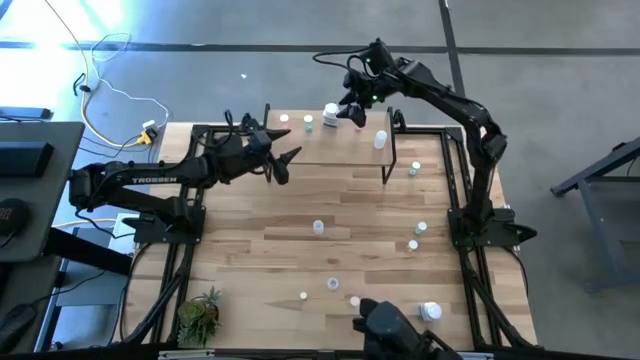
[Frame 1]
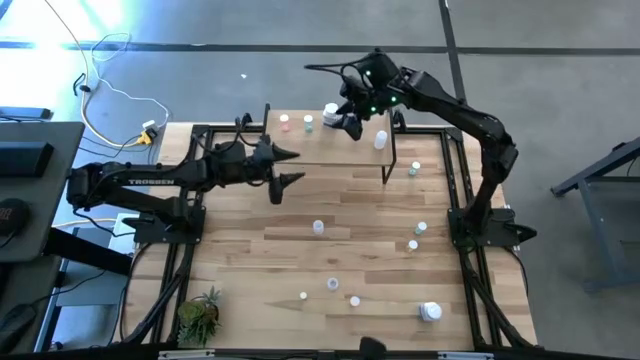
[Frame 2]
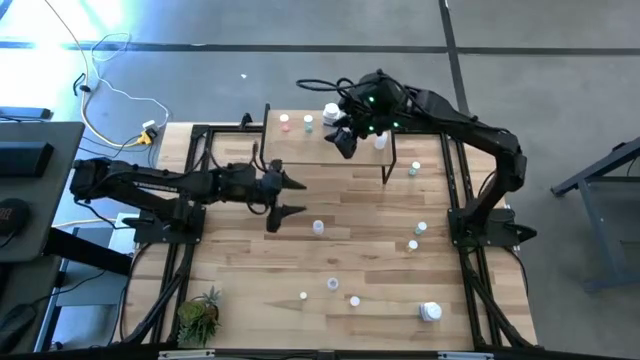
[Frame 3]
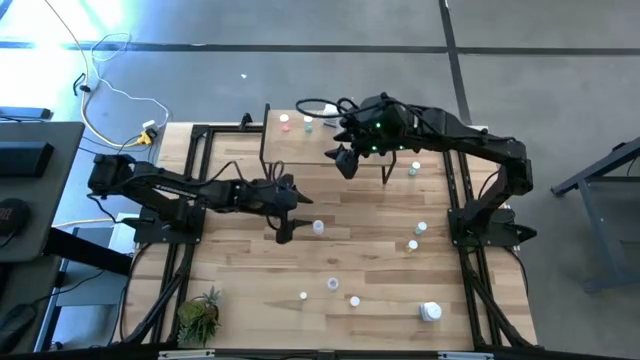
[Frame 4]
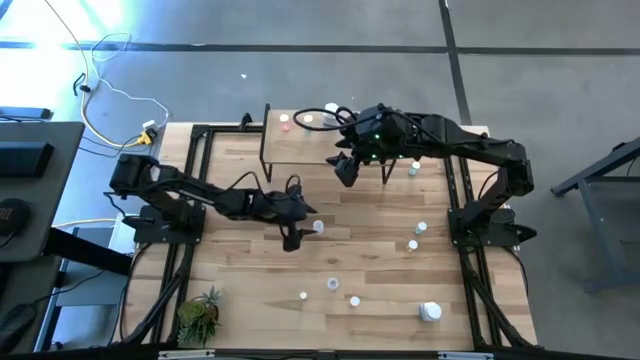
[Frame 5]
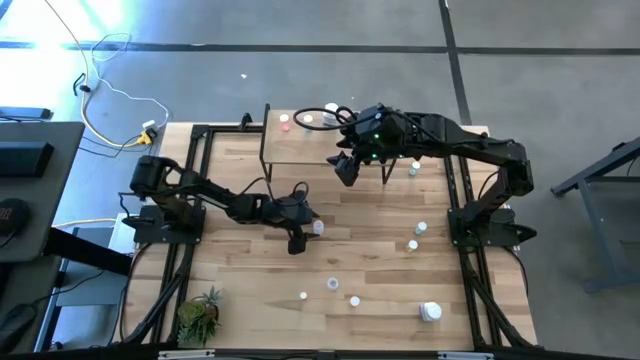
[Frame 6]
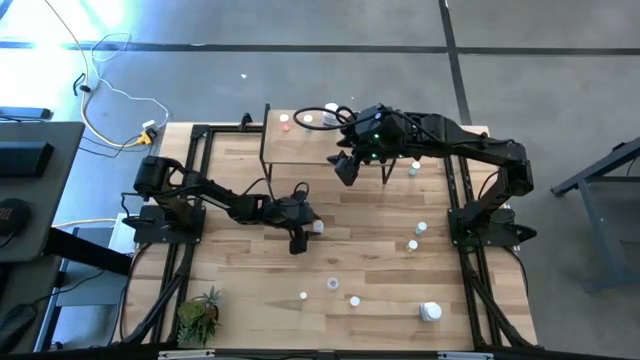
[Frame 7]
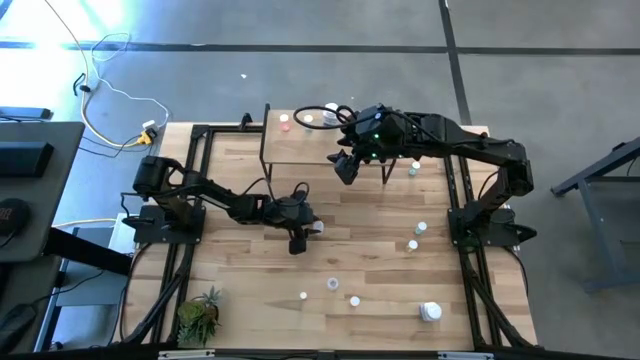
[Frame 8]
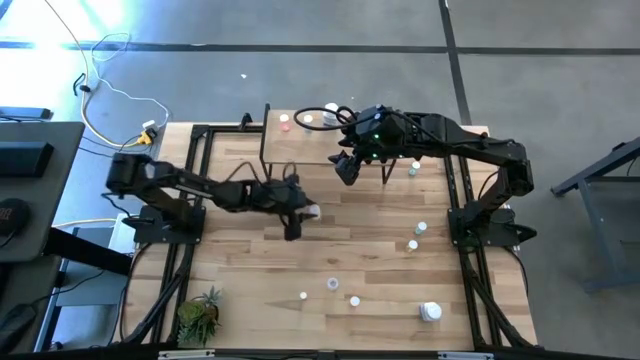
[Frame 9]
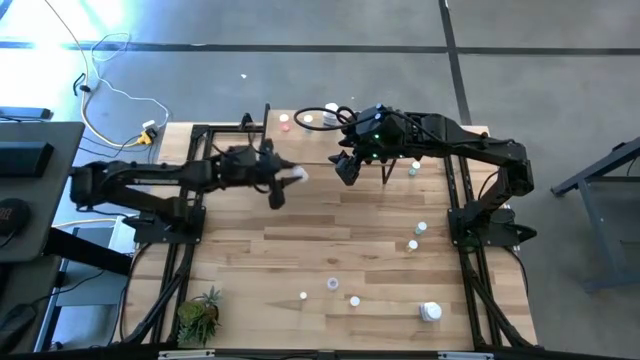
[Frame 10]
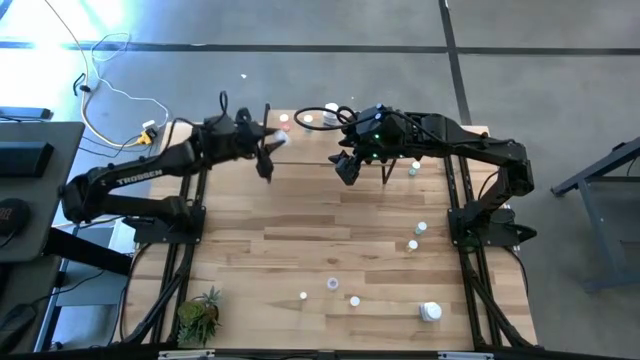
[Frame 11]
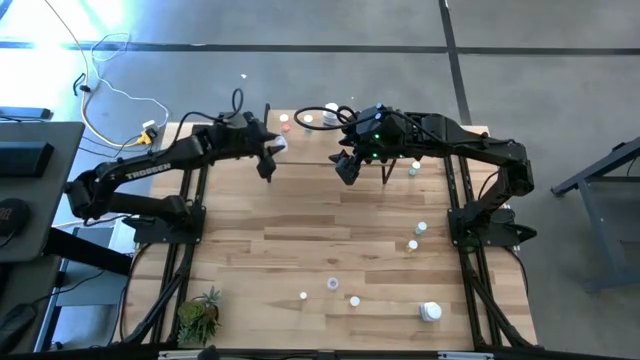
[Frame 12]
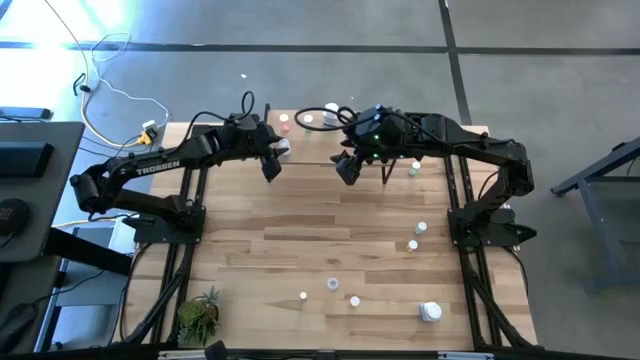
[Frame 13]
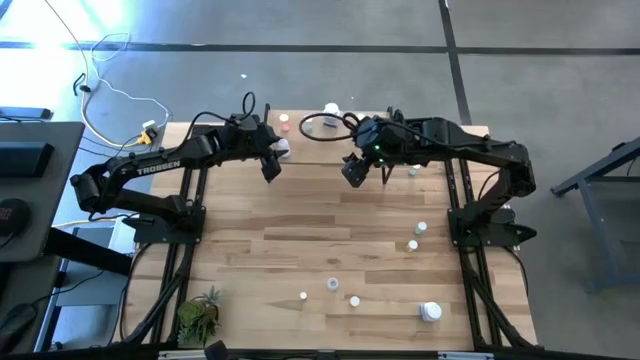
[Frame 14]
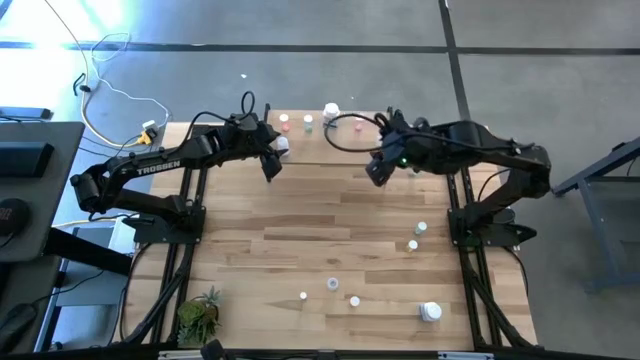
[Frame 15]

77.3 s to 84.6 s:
Task: Pick and place medicine bottles onto shelf by color
Put the white pill bottle on the shelf

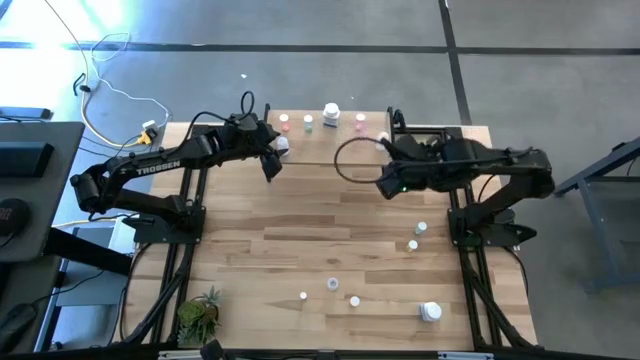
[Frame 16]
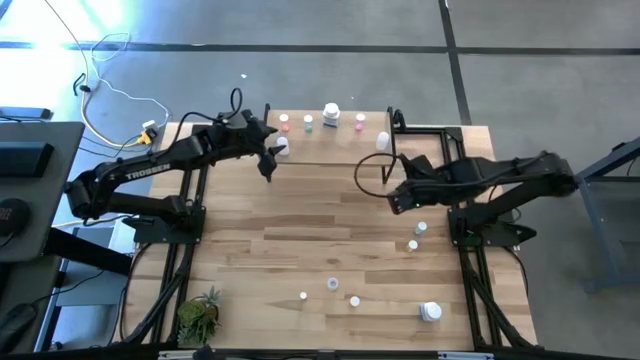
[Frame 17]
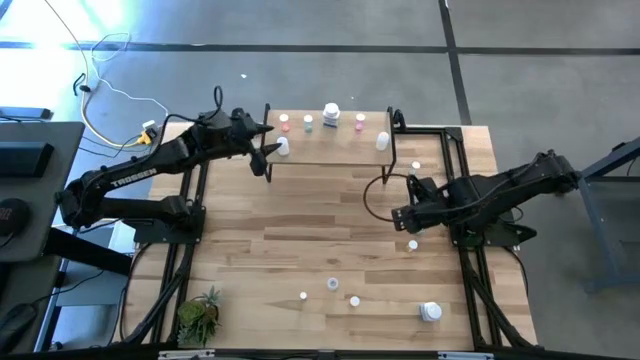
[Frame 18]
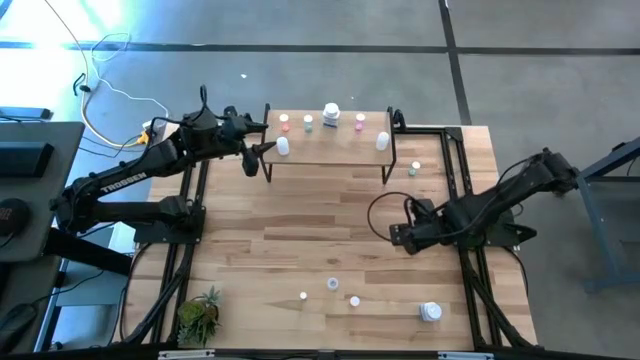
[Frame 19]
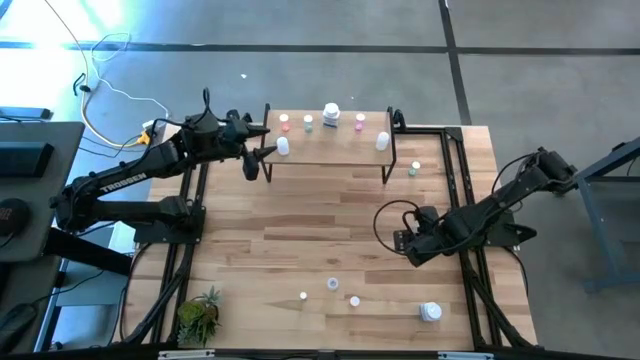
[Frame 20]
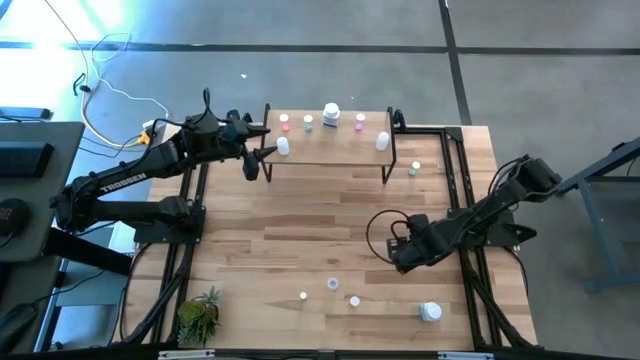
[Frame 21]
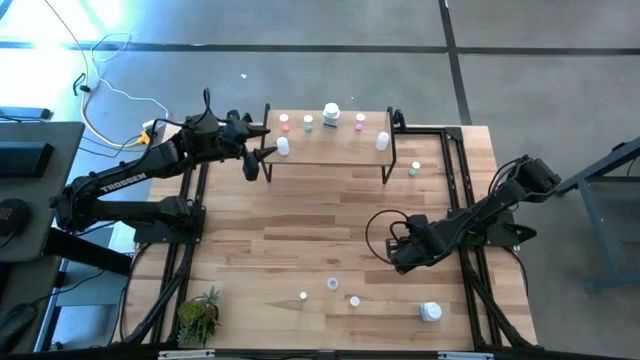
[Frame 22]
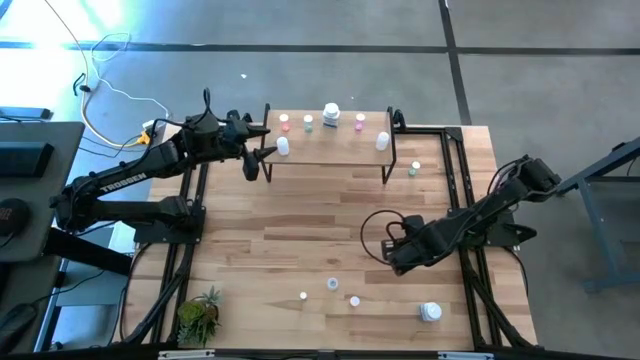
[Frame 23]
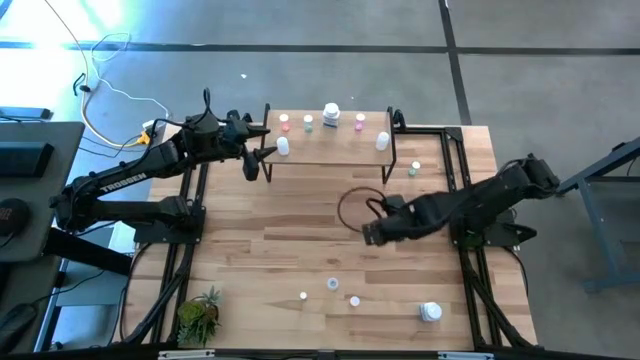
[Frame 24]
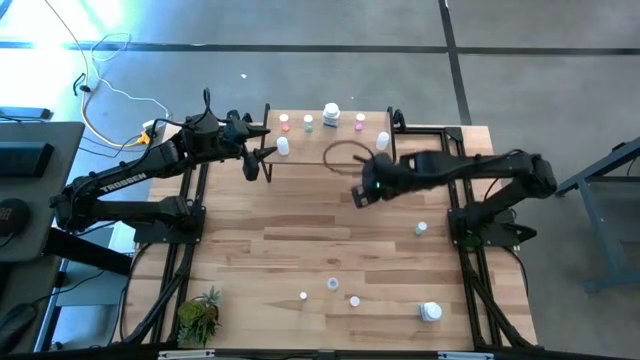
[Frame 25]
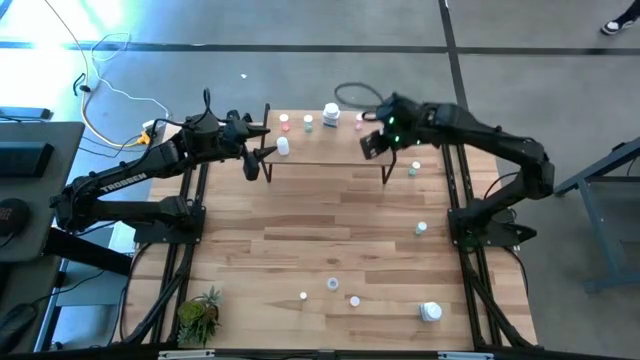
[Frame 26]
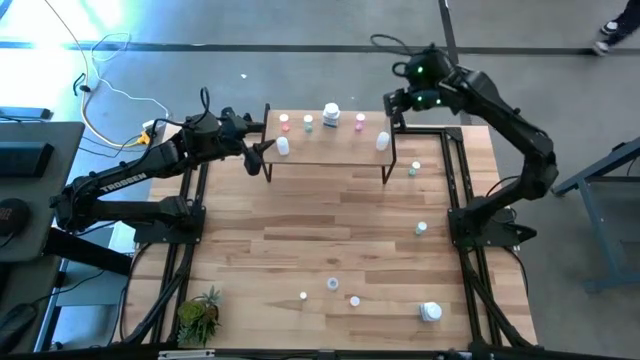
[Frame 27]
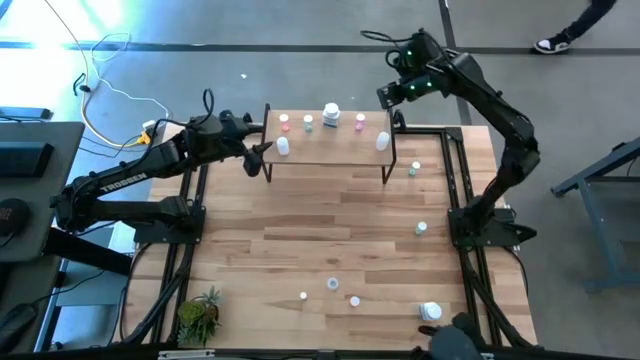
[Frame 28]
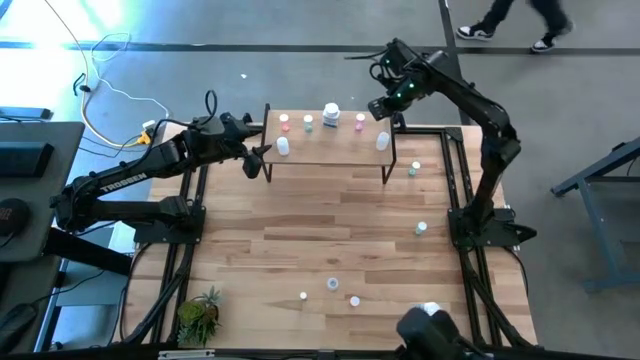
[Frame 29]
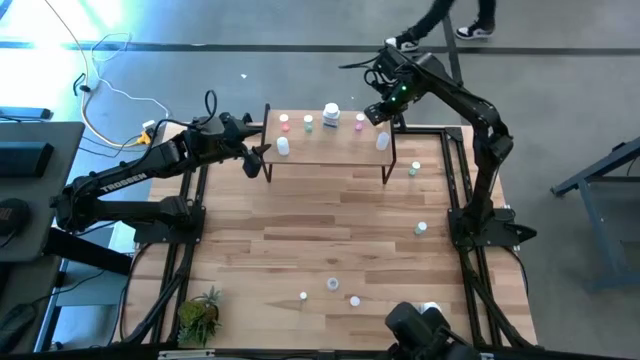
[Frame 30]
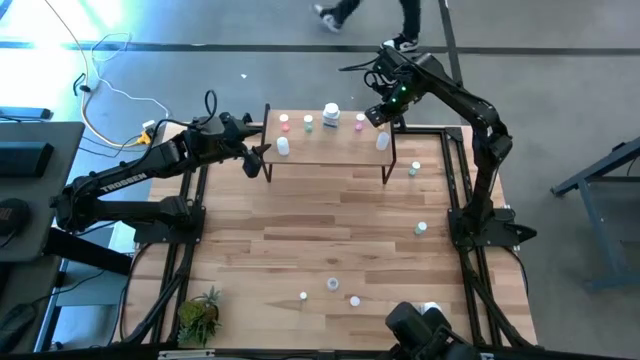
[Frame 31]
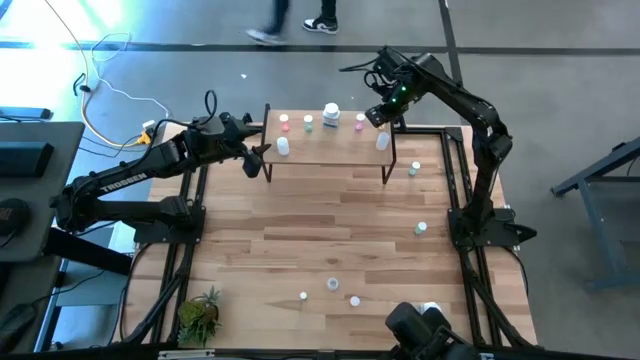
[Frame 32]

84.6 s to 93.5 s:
Put the yellow pill bottle on the shelf

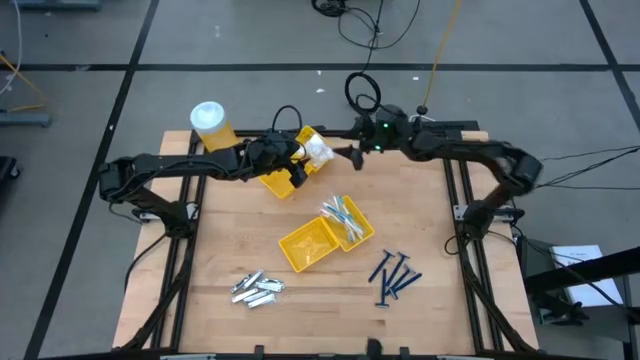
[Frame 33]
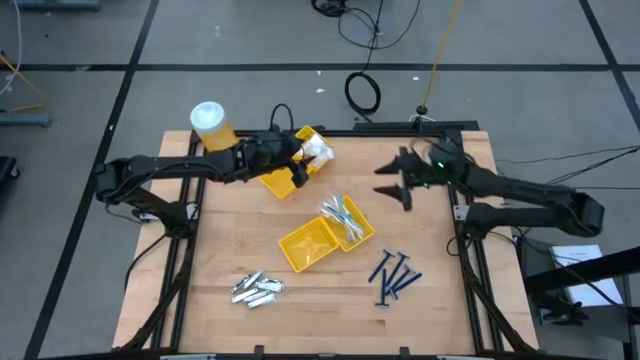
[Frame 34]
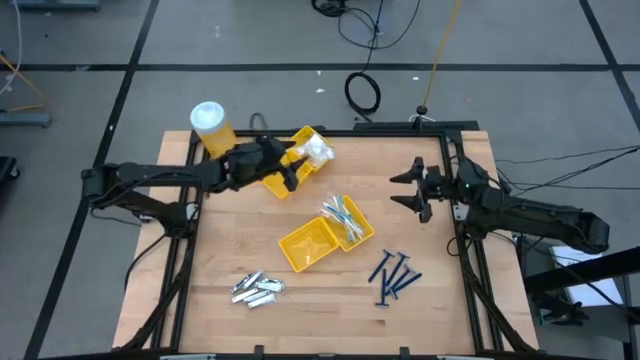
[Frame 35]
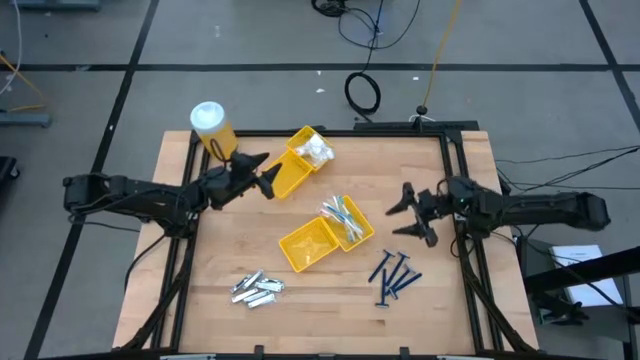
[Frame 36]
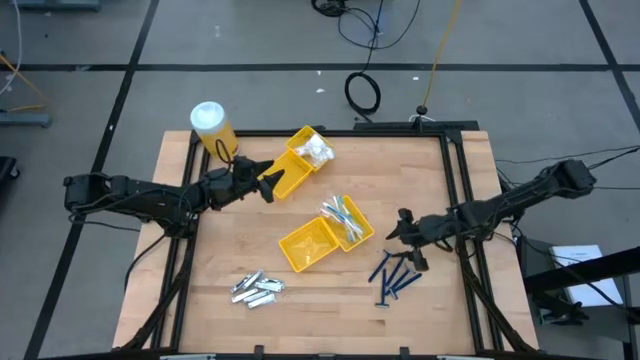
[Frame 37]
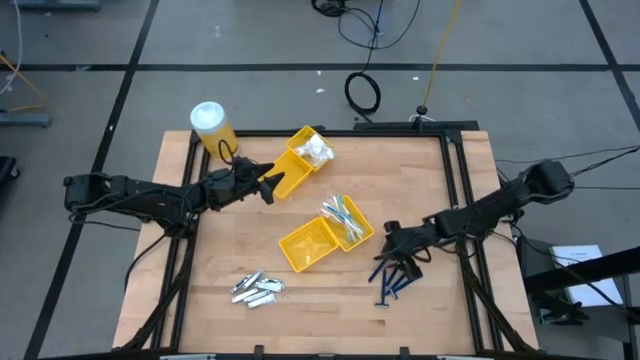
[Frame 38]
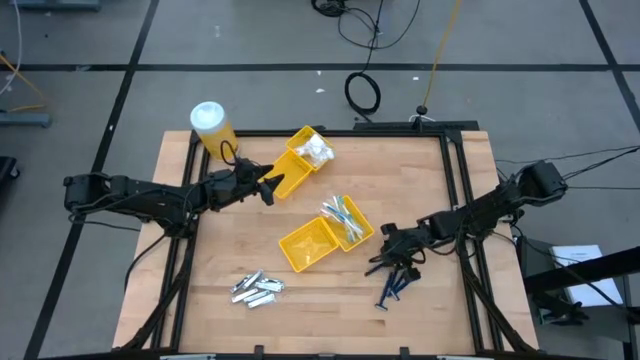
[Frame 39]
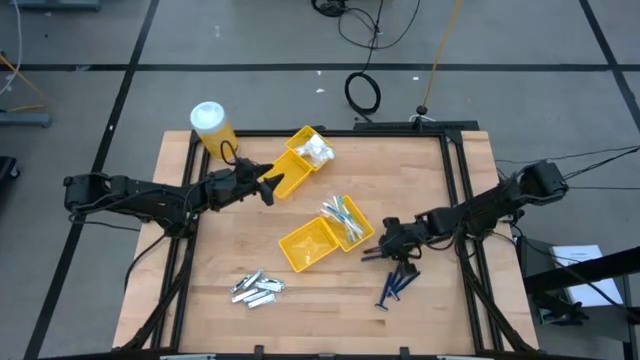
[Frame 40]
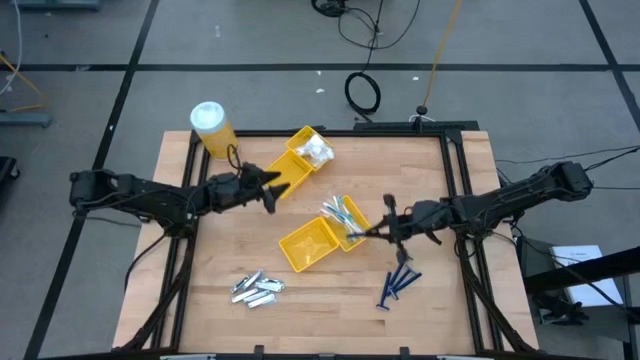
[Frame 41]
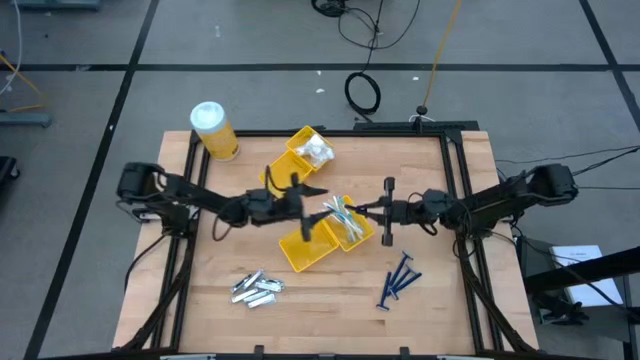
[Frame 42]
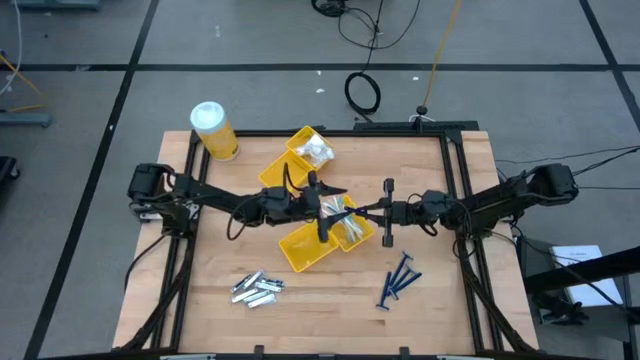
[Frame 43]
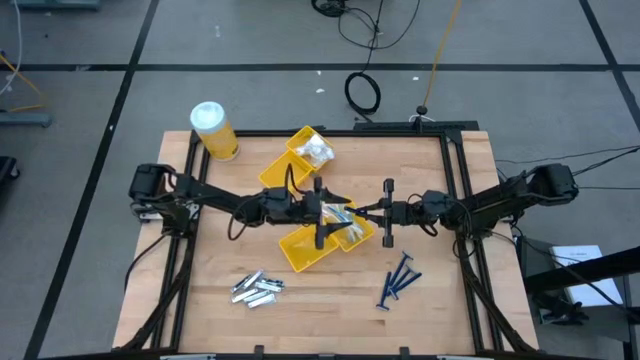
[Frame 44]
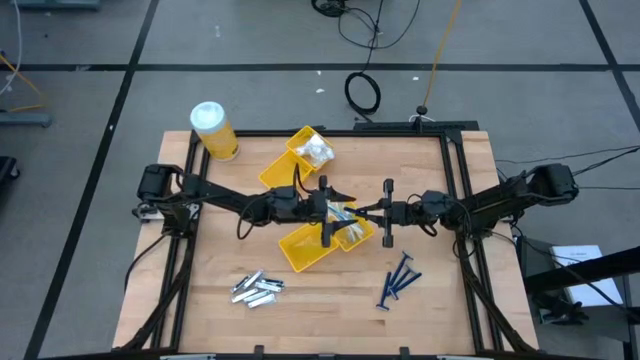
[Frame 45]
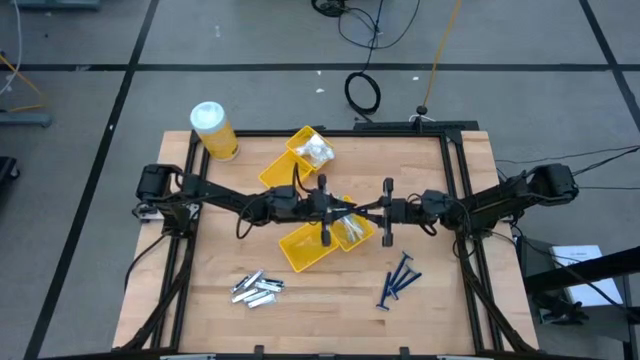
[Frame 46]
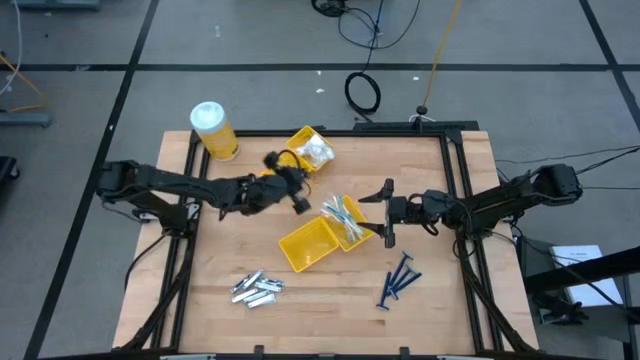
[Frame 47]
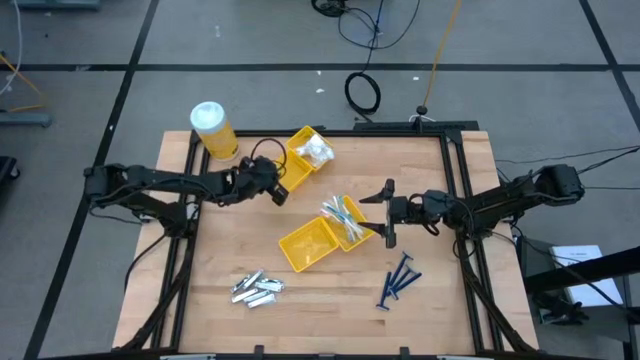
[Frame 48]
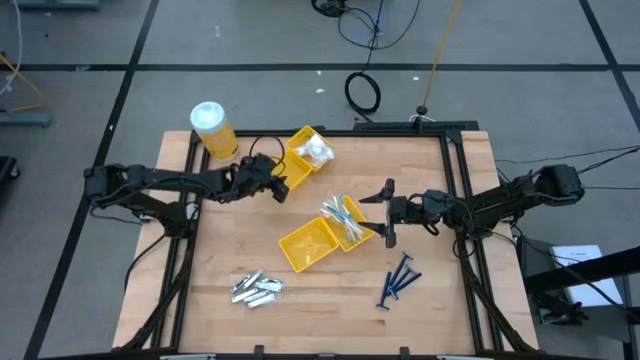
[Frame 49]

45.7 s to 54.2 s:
Task: Pick & Place Travel size toiletries
Put the blue razor into the bottom left yellow basket
